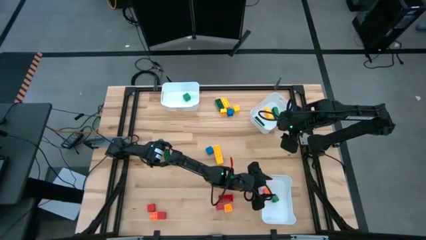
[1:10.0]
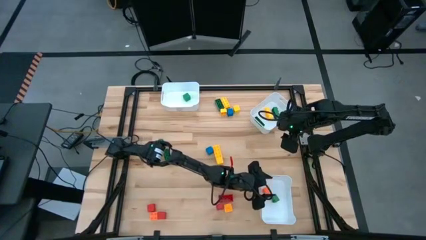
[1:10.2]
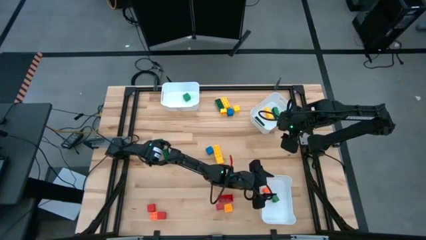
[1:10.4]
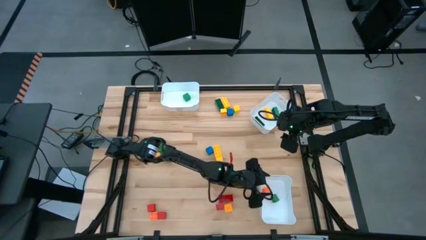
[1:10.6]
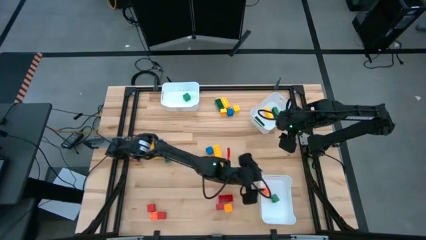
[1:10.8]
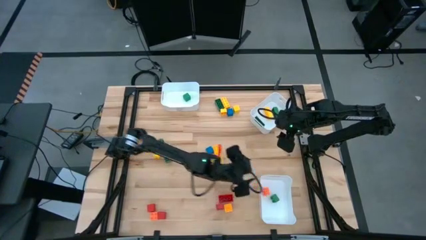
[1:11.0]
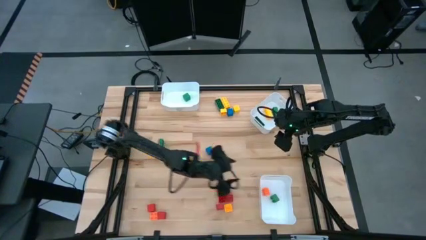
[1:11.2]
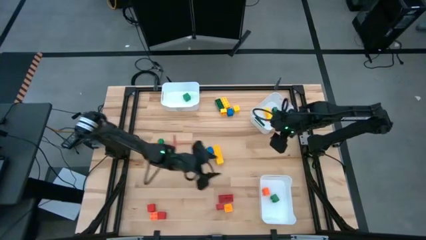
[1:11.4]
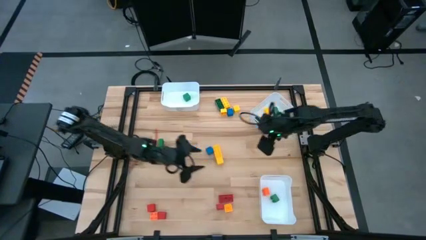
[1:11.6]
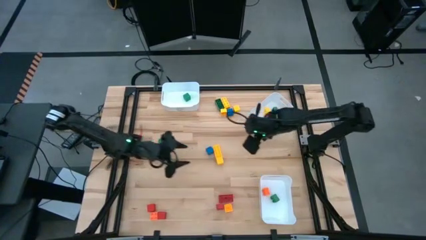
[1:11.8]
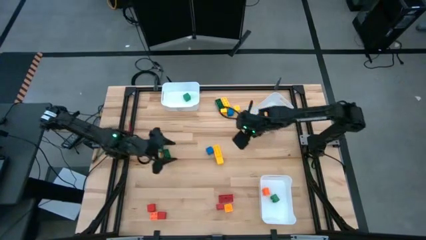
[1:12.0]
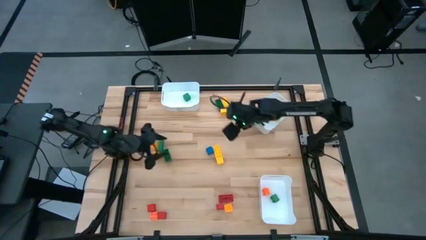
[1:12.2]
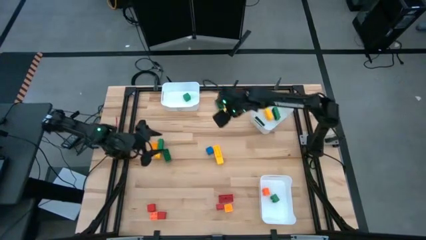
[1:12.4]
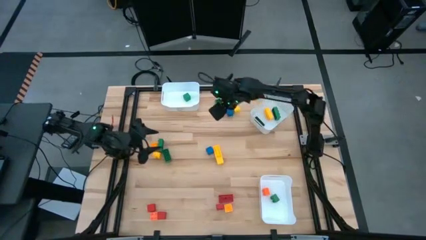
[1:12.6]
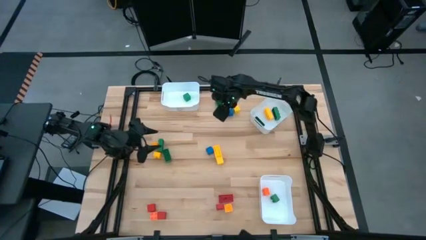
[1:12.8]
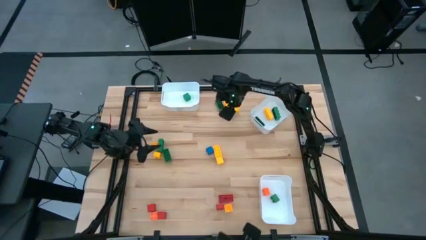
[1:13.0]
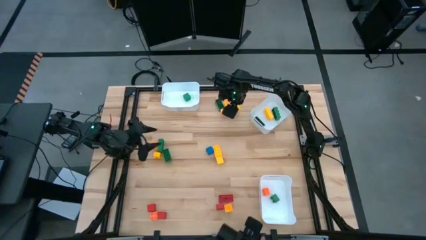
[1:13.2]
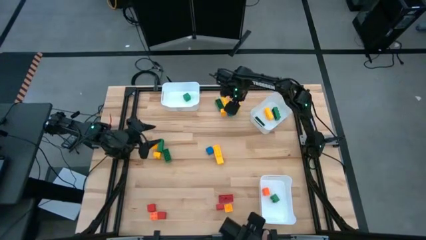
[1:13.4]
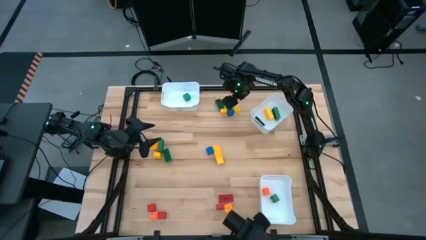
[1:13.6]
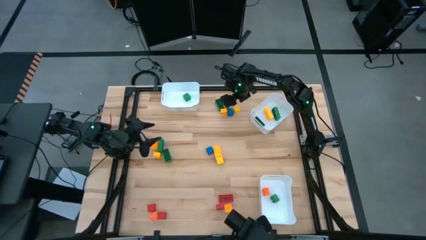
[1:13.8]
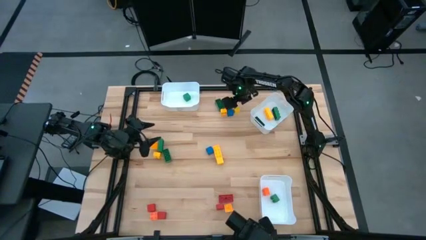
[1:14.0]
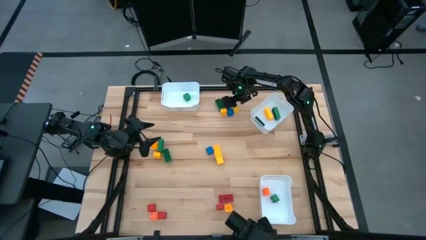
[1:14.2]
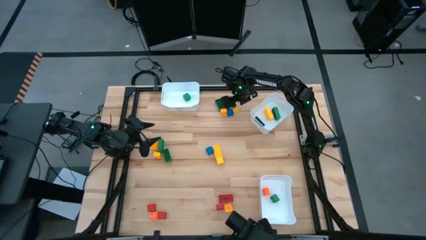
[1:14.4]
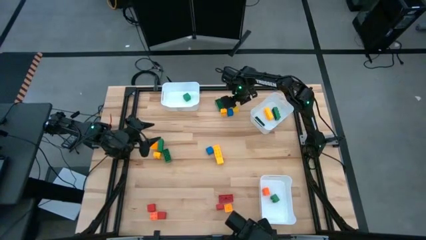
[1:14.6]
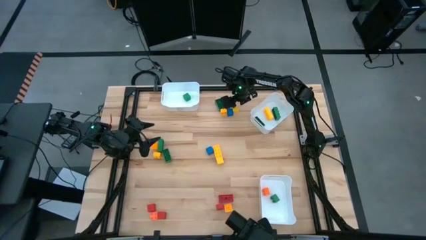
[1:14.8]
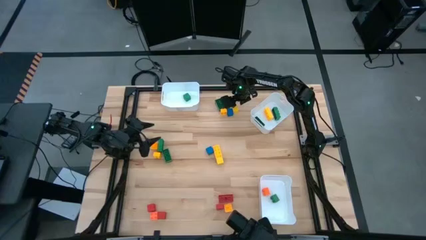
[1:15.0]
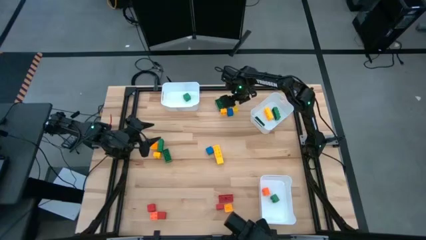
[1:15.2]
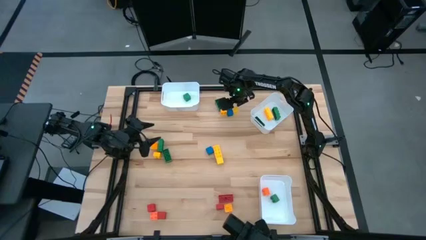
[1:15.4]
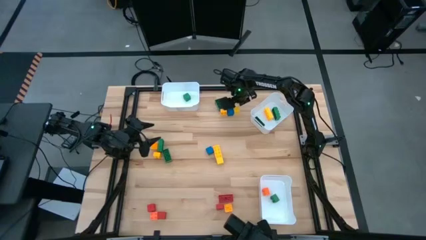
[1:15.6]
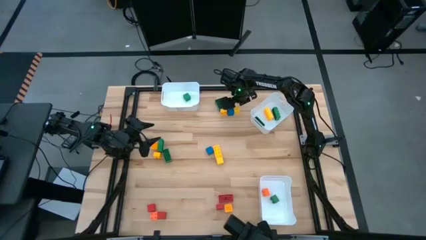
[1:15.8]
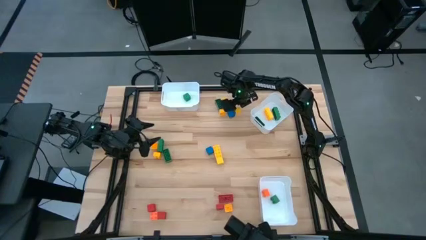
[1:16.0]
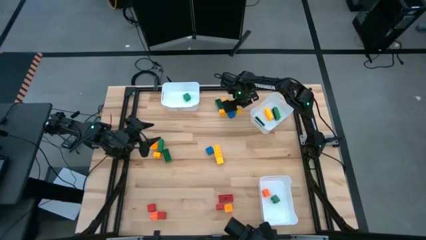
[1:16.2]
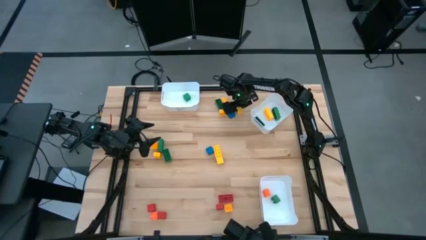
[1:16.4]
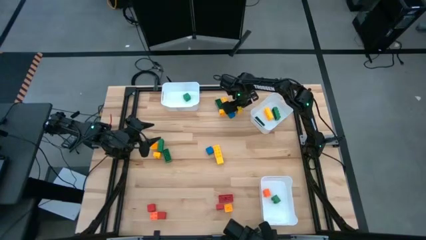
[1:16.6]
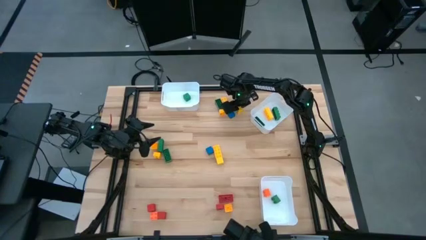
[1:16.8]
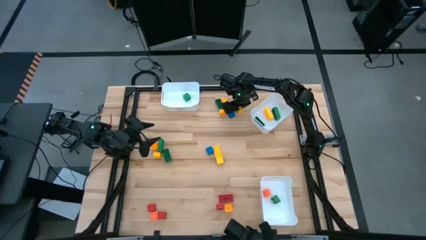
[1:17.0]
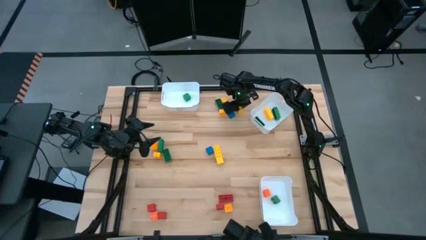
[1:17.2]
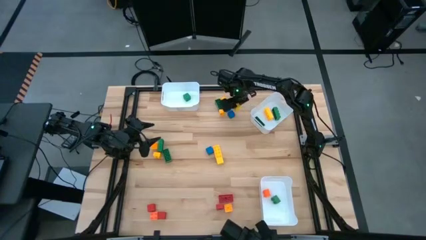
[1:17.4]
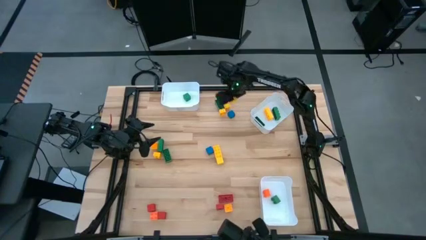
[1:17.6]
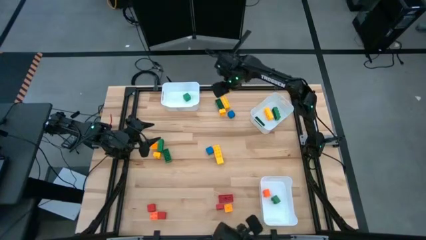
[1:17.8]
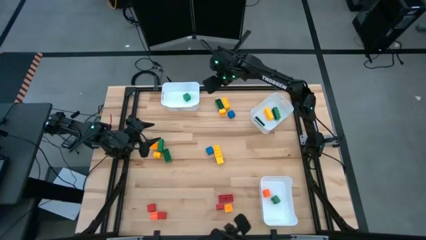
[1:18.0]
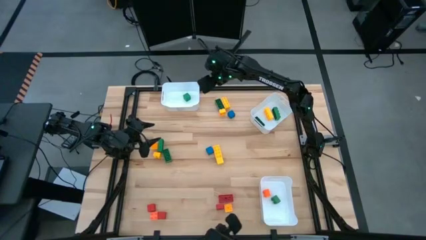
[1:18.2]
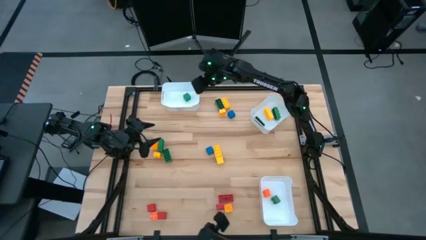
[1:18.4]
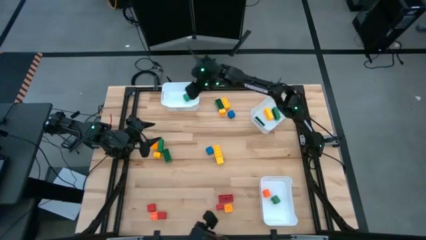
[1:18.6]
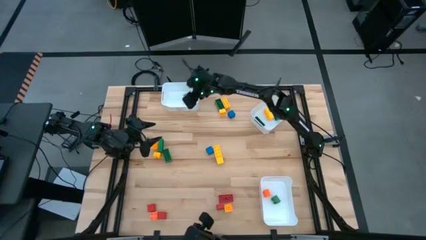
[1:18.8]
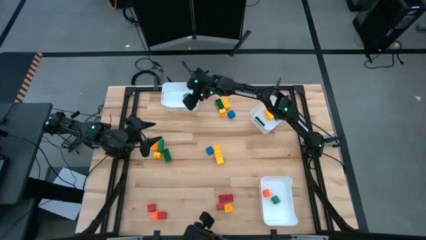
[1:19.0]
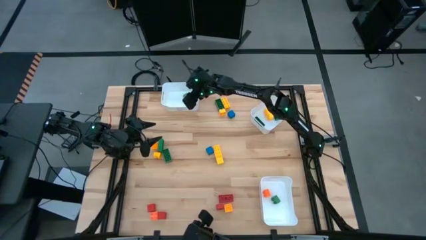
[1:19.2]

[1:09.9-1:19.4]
Task: Sort blocks by size
Put the yellow square block into the top left white bin

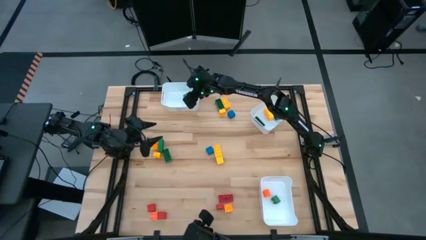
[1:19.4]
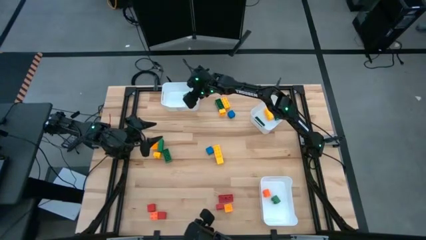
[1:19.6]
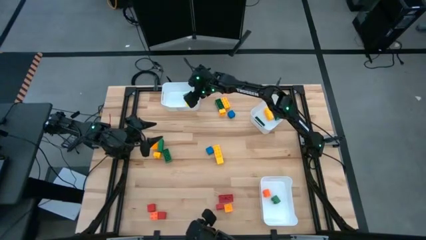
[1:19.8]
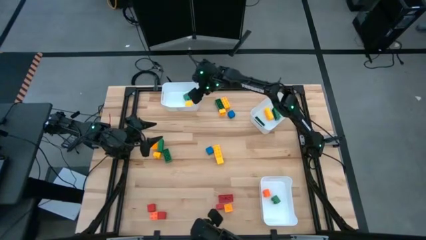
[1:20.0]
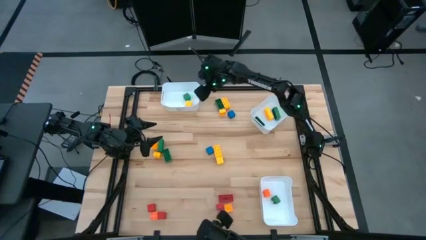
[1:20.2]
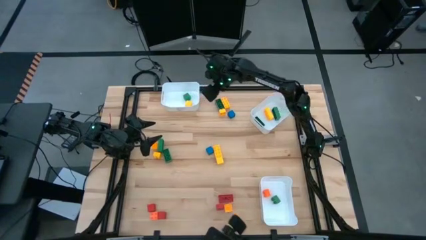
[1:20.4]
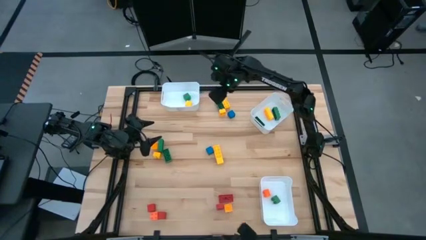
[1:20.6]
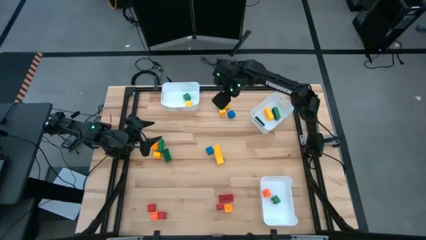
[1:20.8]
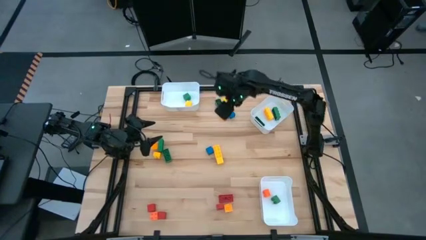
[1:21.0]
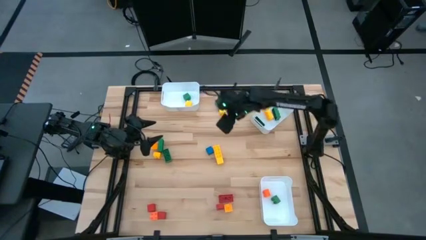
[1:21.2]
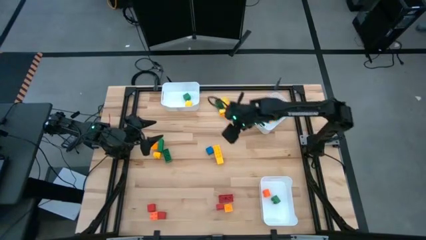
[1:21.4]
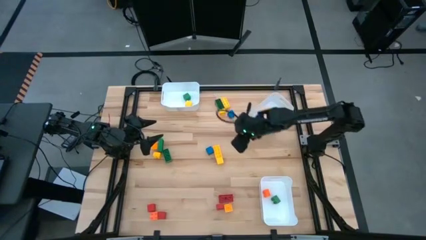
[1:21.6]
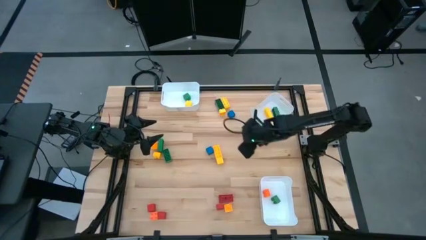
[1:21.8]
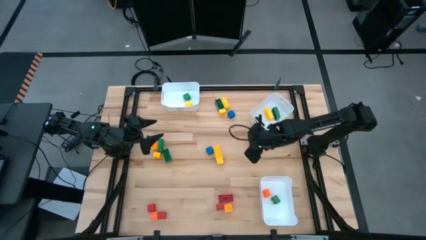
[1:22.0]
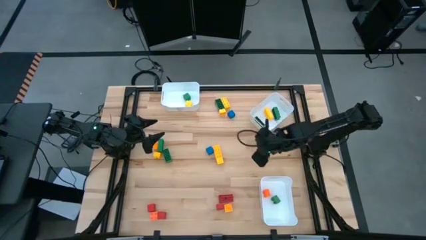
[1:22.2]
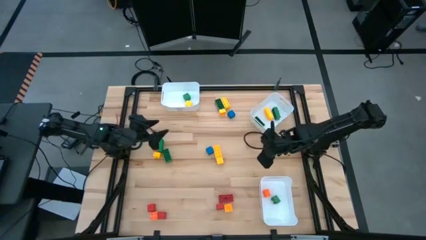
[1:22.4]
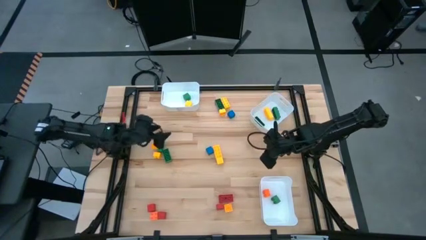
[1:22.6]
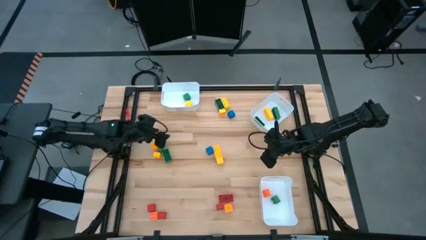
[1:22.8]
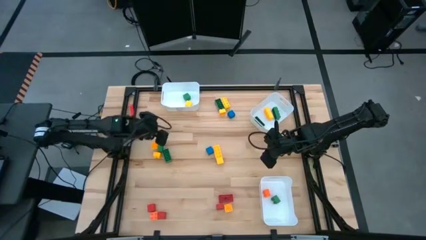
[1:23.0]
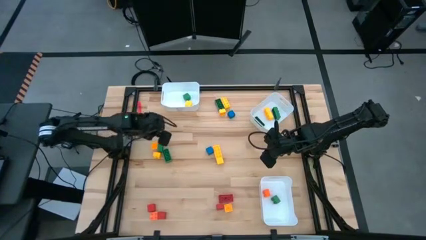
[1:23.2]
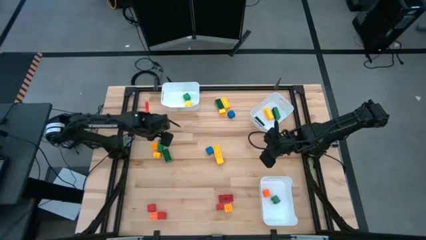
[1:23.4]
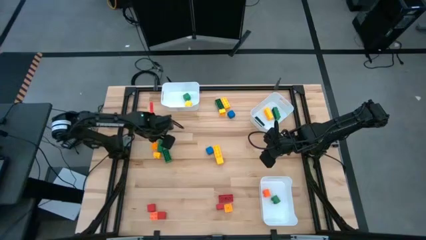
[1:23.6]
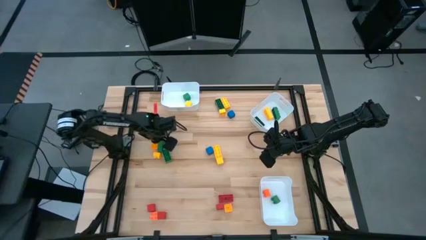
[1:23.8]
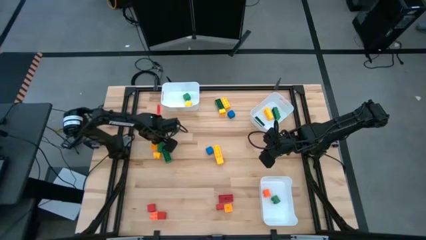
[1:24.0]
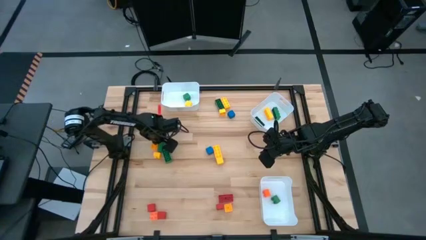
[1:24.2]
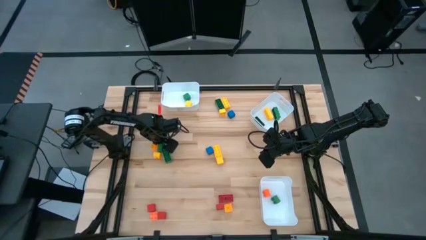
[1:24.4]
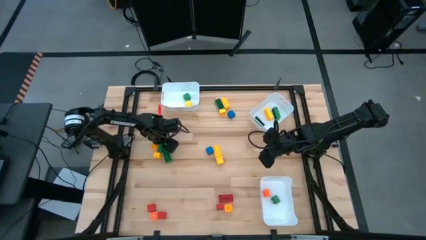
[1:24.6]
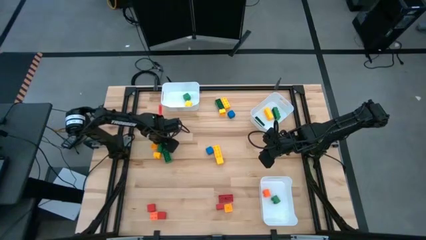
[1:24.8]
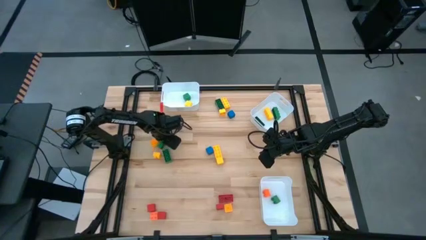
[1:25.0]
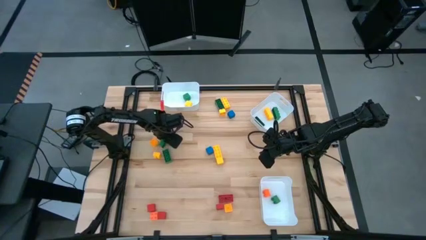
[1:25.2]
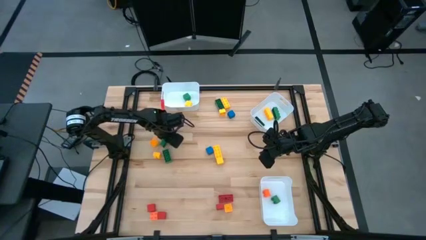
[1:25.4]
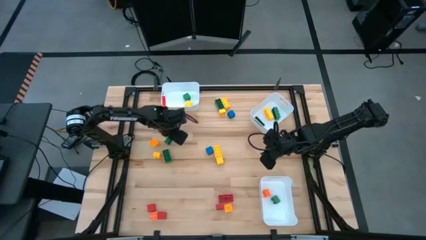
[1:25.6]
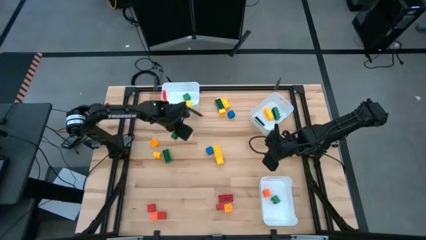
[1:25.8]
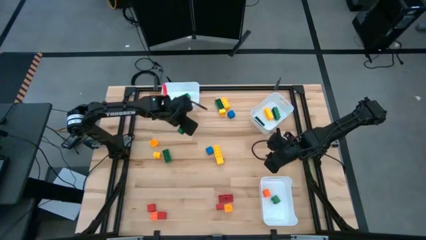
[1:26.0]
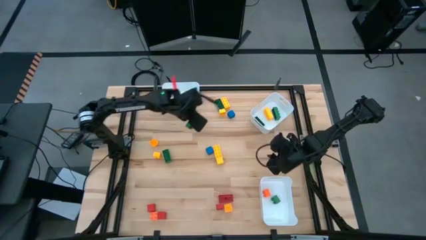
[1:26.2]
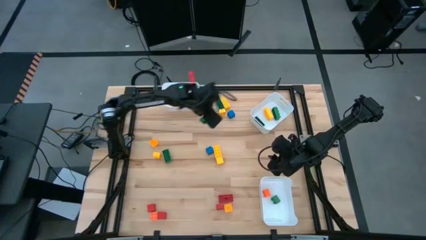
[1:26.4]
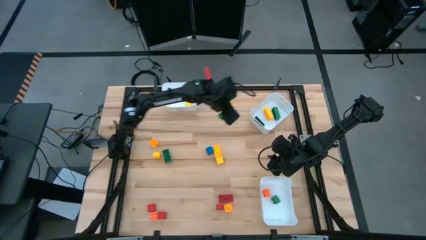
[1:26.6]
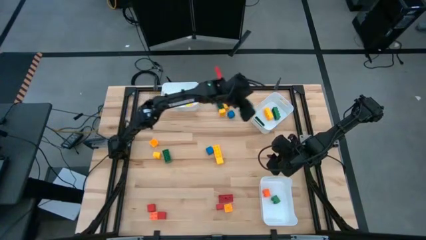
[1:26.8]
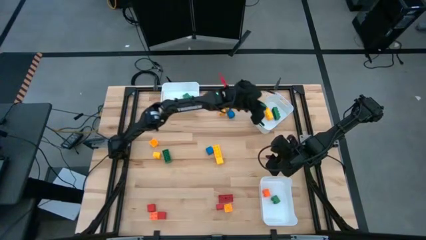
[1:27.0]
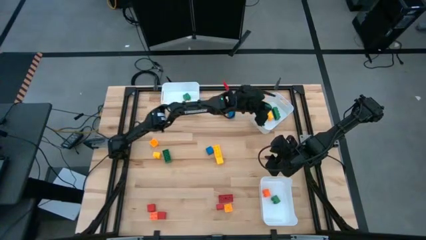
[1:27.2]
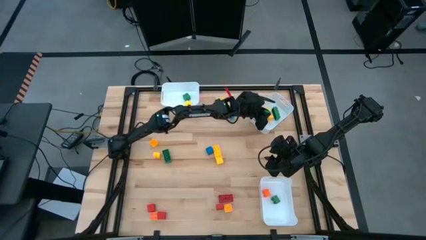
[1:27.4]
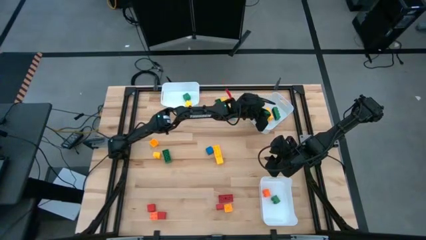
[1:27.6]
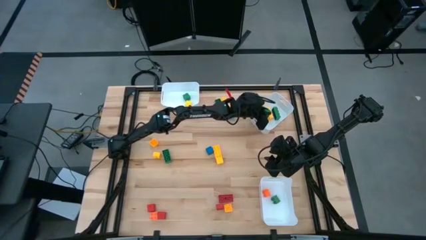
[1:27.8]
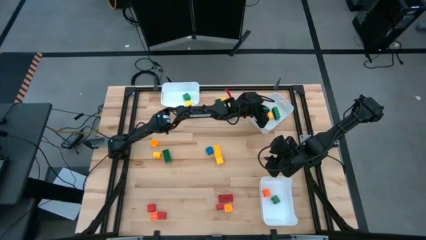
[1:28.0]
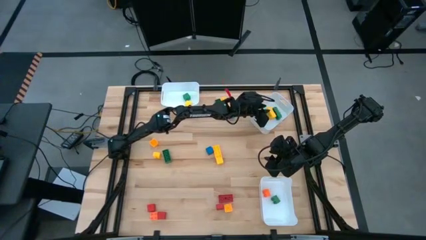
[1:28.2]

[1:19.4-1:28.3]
Put the green 8 stud gamepiece into the top right white bin
